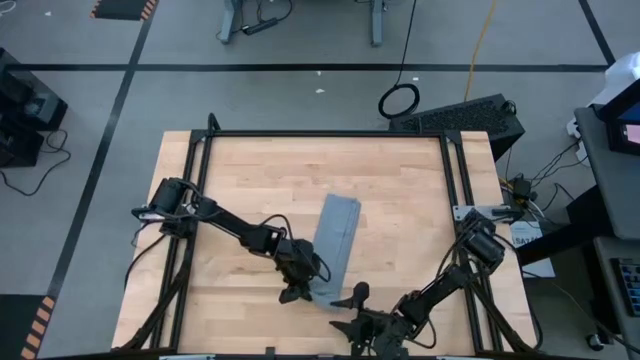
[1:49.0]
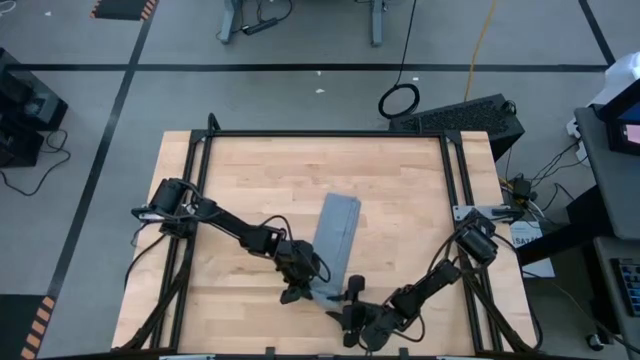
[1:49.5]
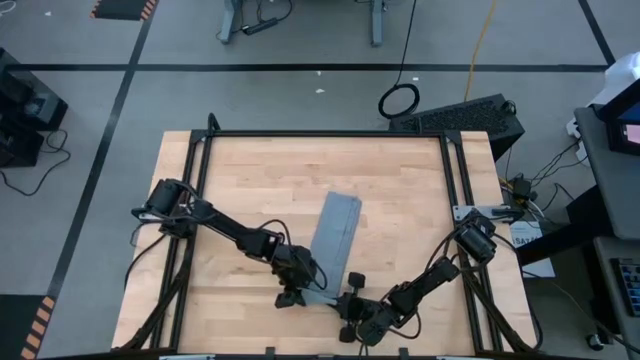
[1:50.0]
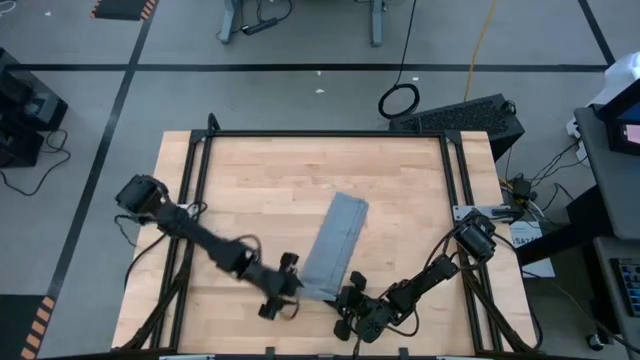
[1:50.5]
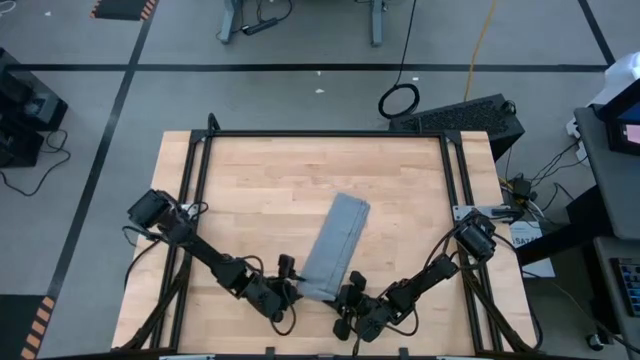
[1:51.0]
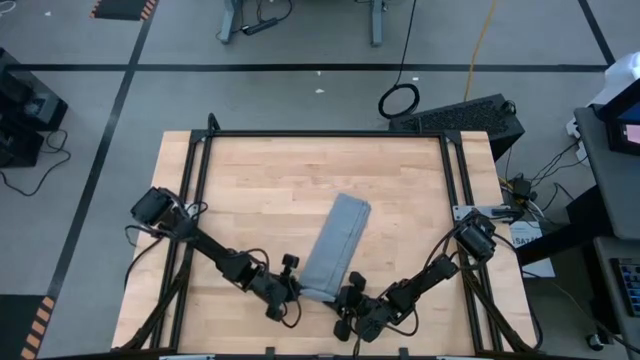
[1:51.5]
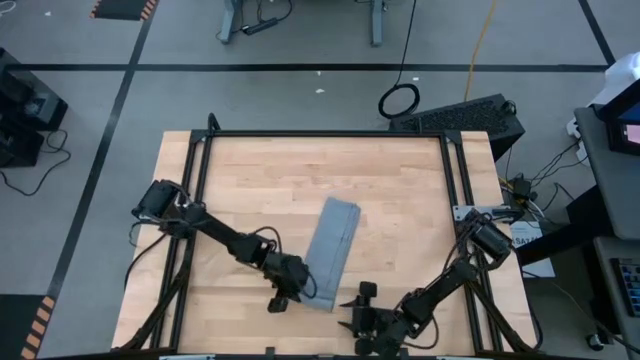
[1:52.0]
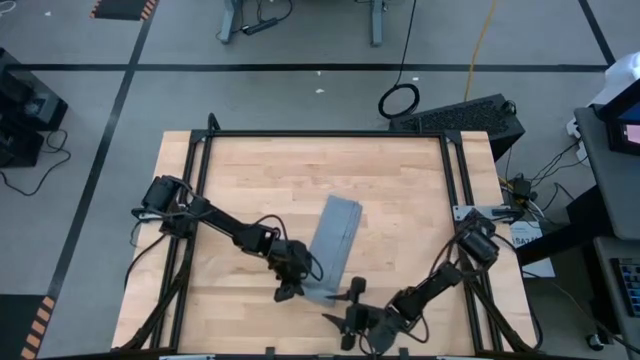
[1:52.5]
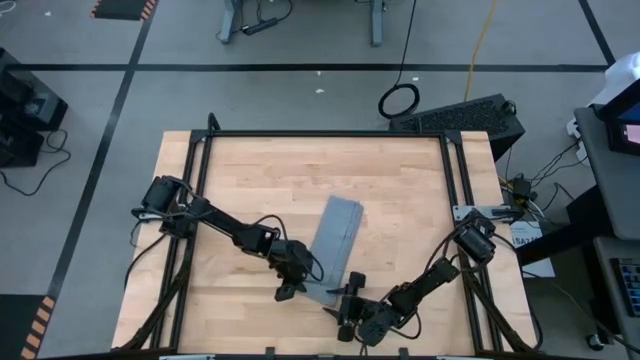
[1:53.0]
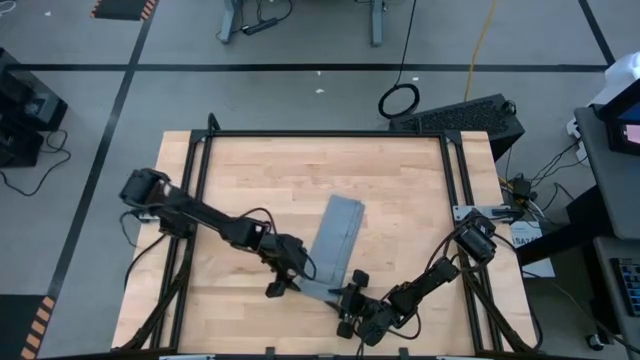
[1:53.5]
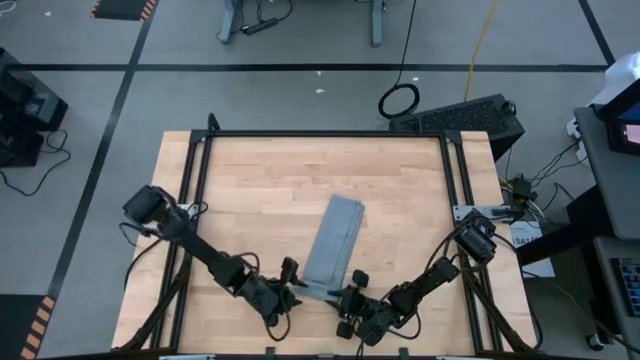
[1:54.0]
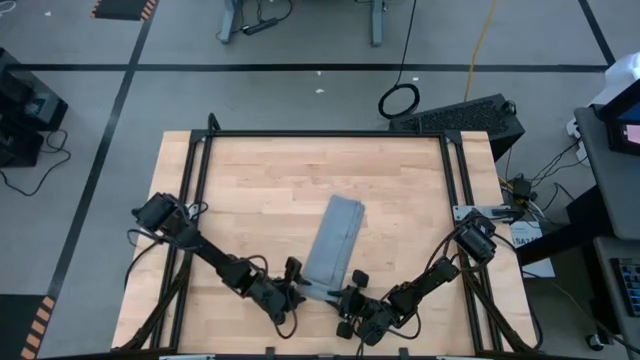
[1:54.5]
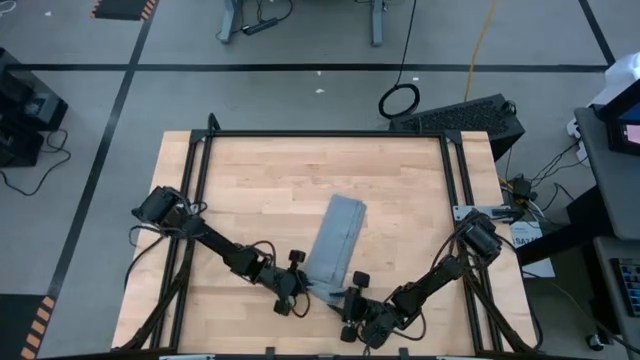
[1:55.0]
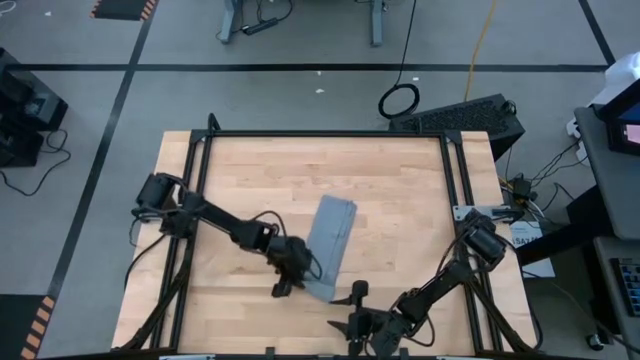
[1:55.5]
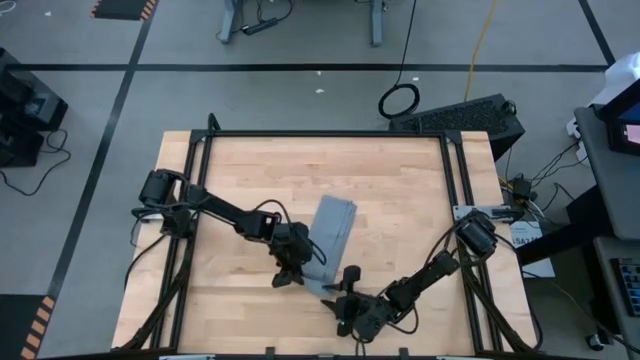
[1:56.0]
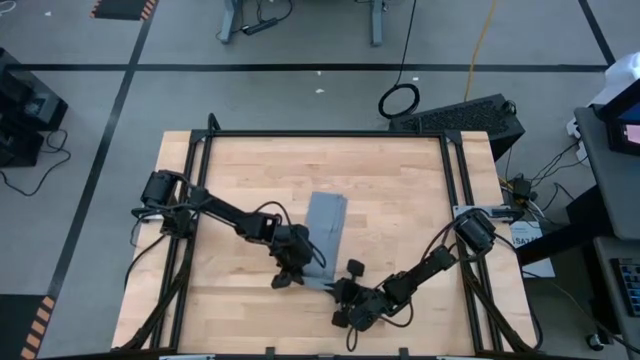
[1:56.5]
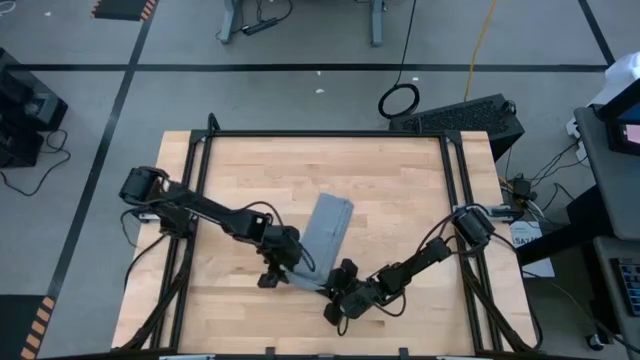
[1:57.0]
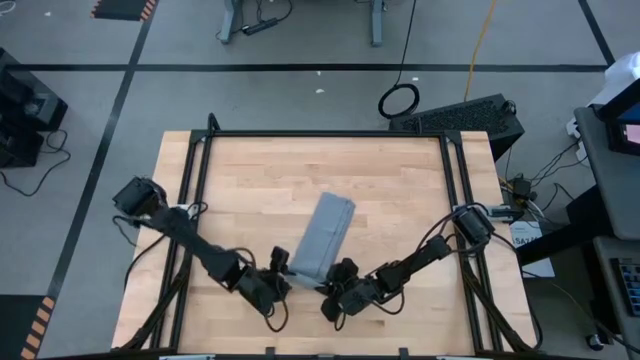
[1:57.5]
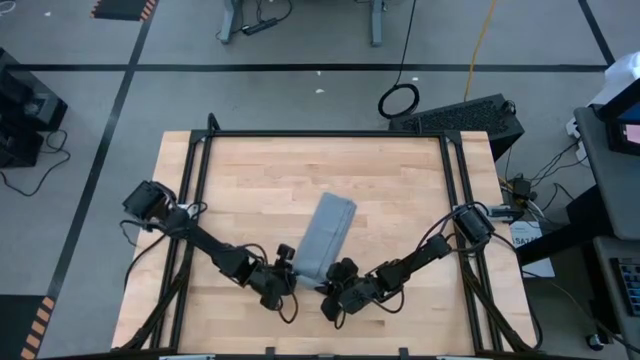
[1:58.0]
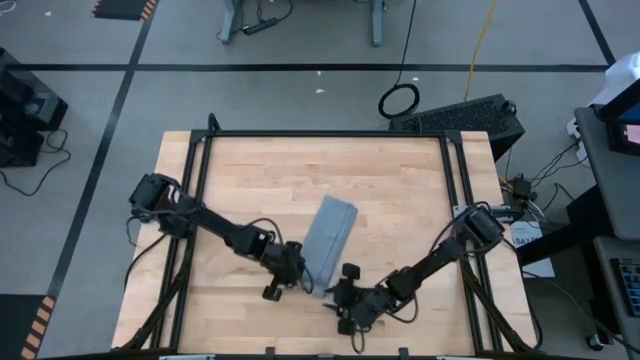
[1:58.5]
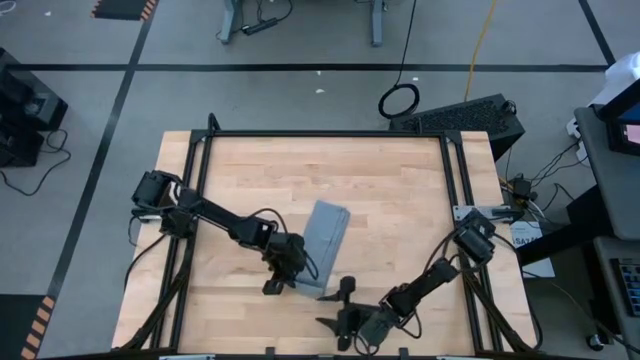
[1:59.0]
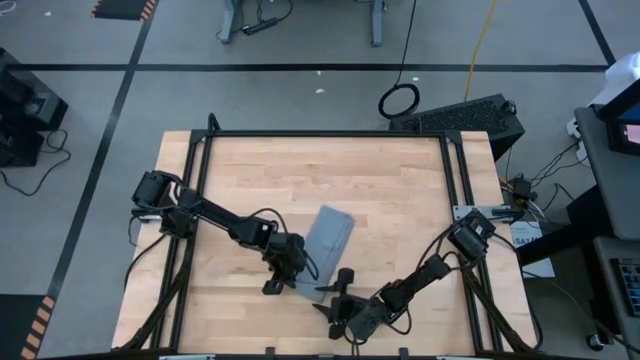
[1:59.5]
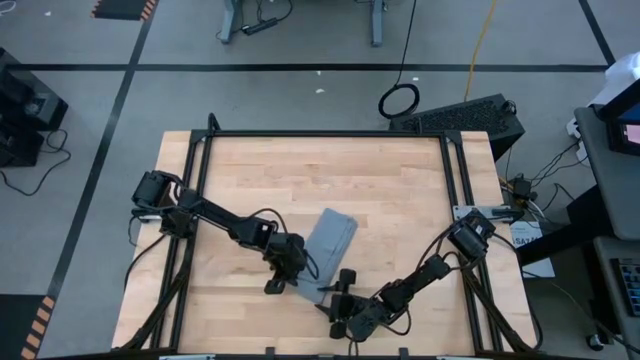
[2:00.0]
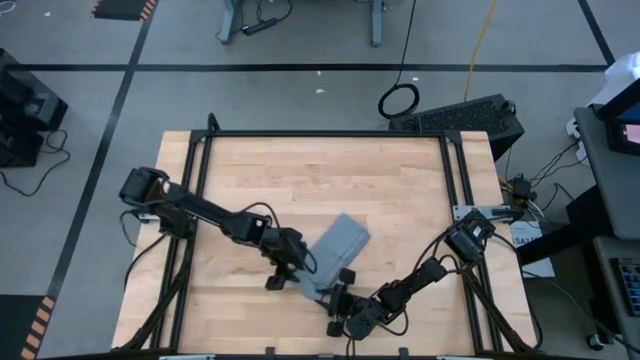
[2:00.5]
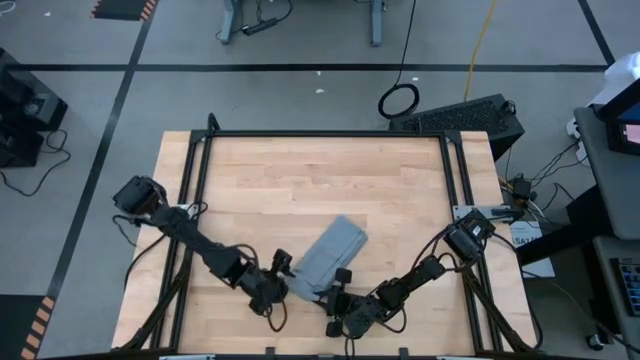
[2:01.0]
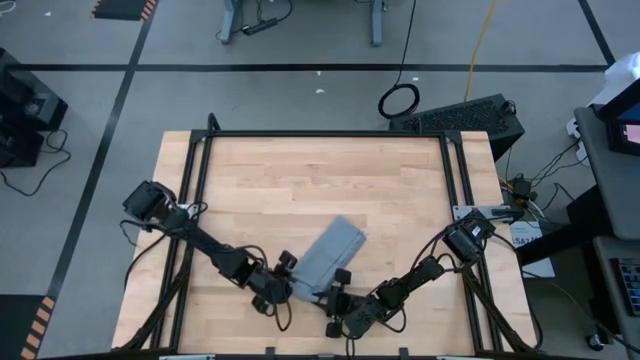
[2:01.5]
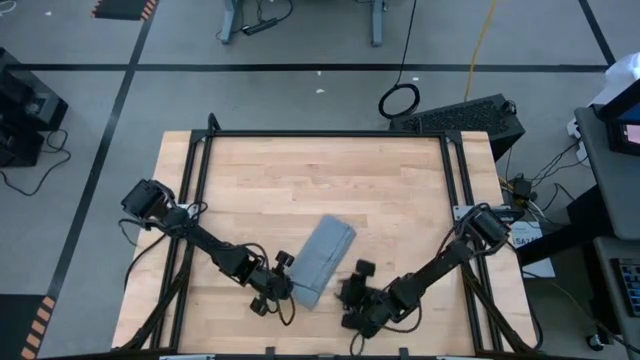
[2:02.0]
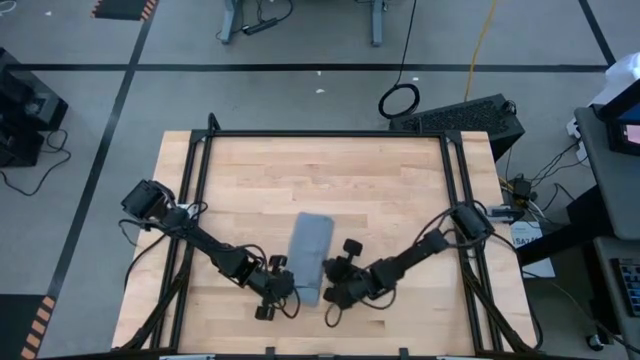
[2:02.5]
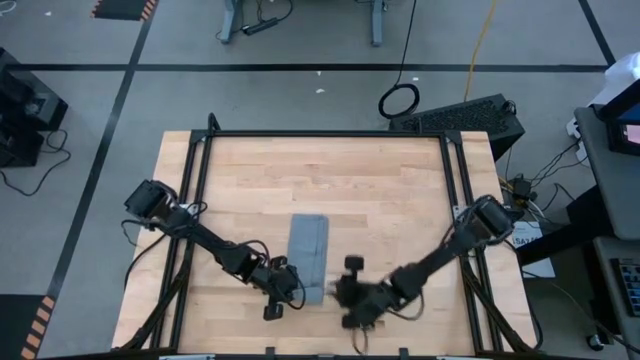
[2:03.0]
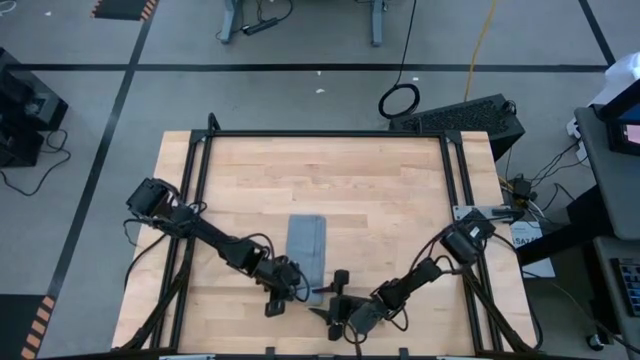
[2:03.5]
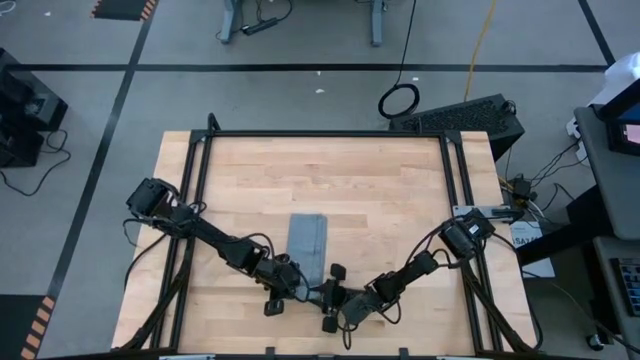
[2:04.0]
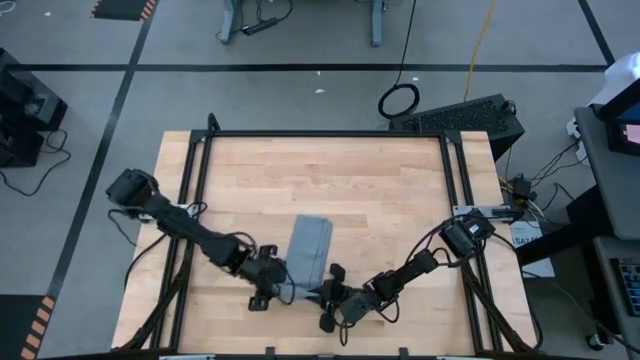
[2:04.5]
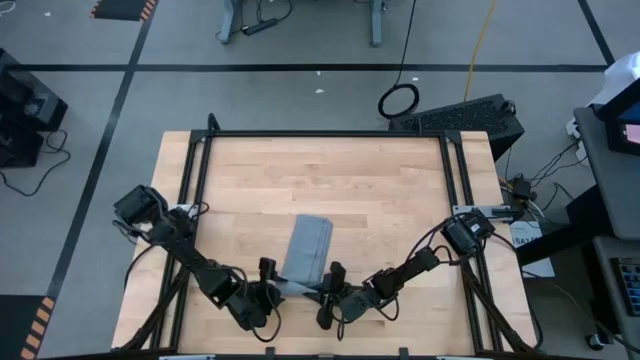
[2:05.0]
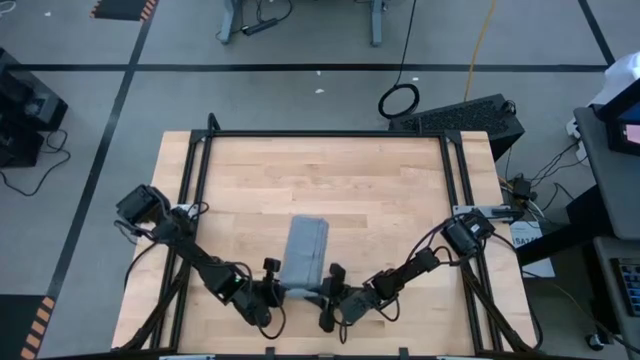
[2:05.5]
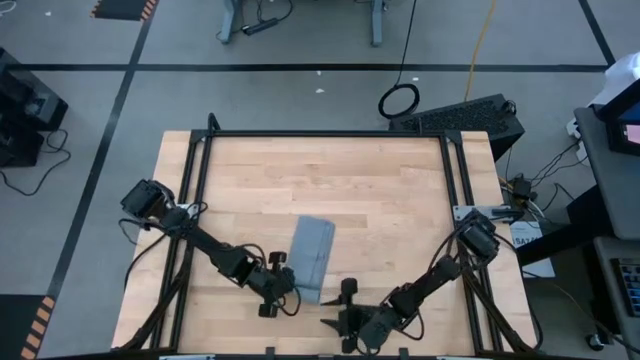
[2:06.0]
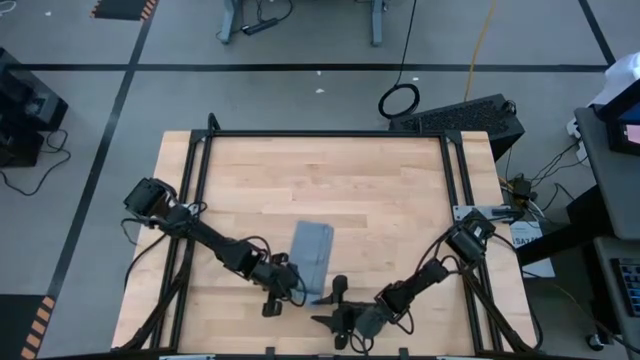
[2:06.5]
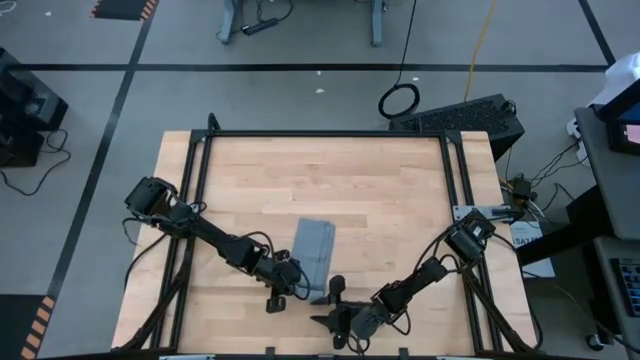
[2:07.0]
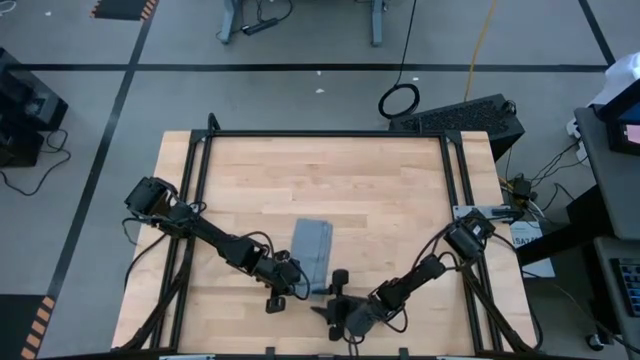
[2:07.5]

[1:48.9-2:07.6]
Task: Roll towel
Roll the gray towel on the table

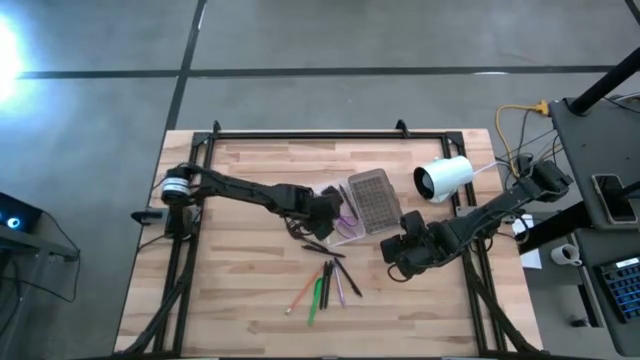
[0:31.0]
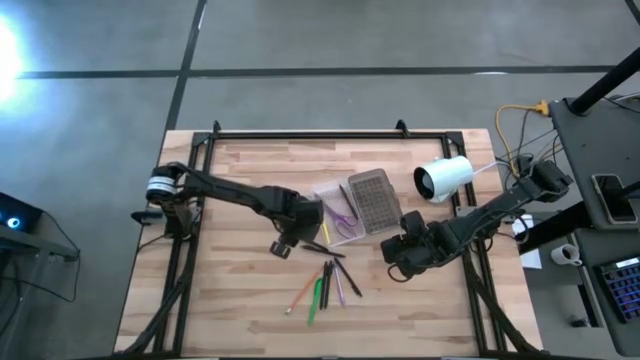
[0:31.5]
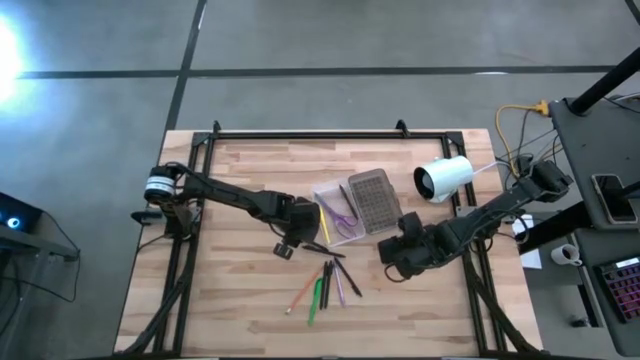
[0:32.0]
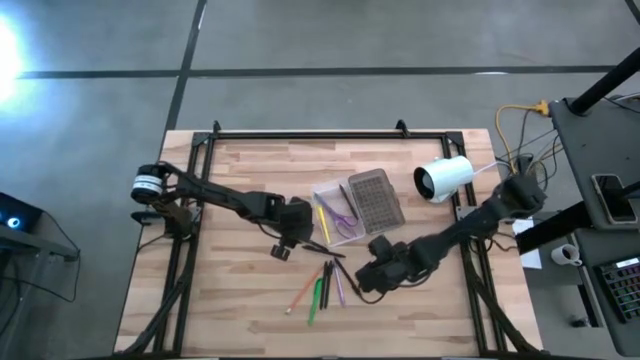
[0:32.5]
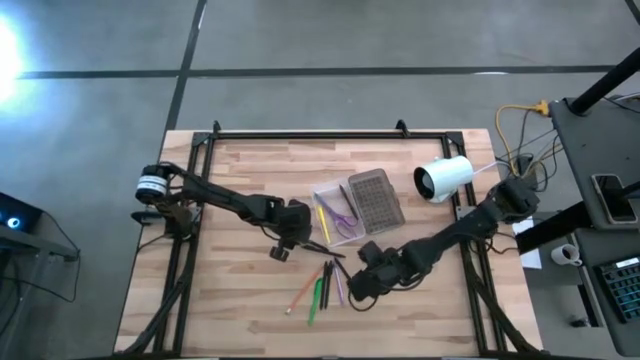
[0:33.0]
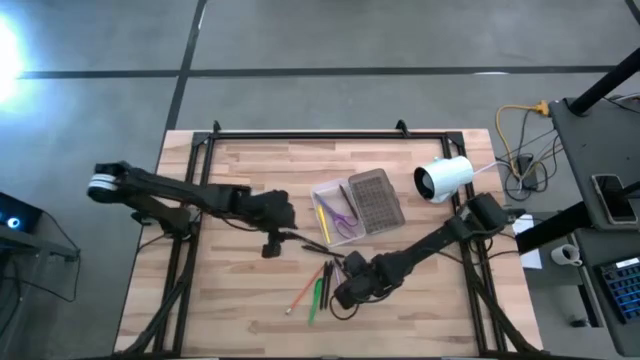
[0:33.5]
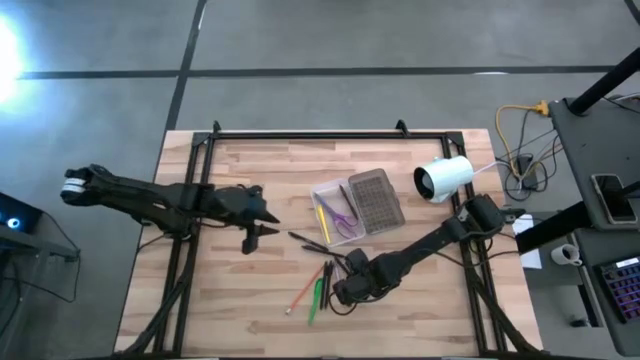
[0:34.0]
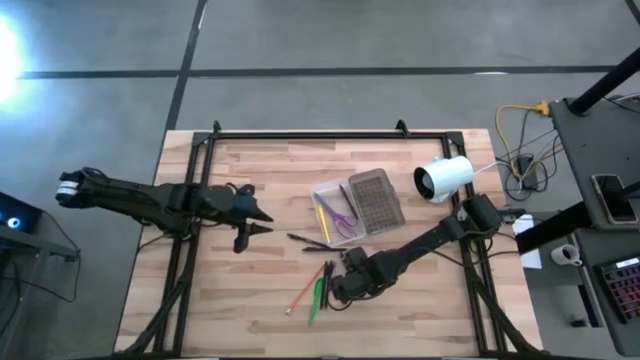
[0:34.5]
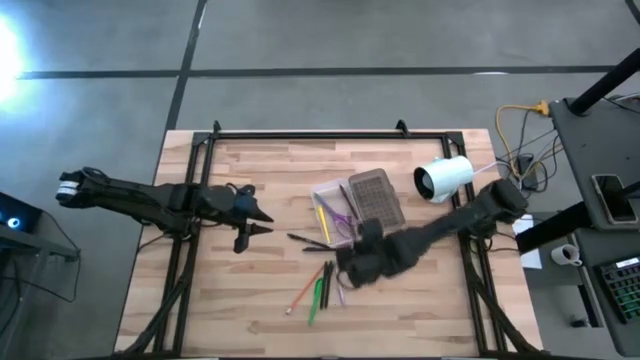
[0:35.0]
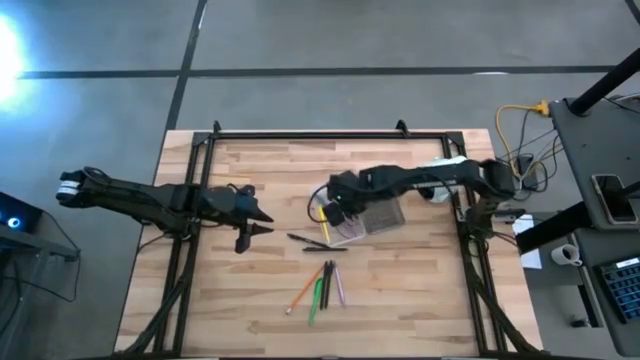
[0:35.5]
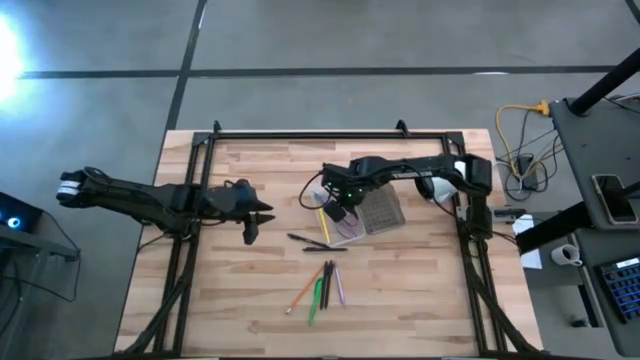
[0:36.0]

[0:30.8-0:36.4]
Task: Pick & place school supplies into a supply box
Put the black pen into the supply box
